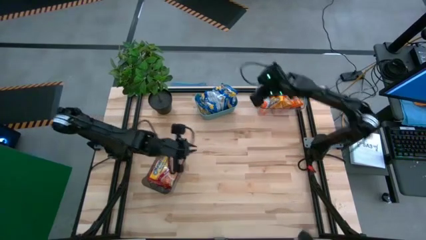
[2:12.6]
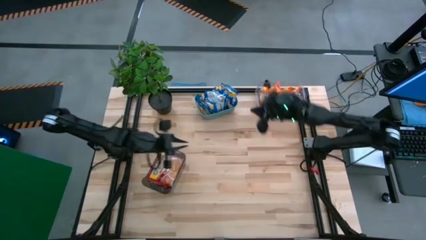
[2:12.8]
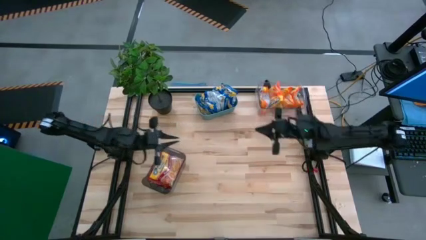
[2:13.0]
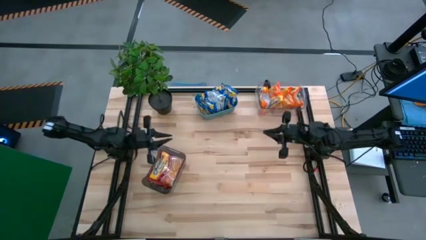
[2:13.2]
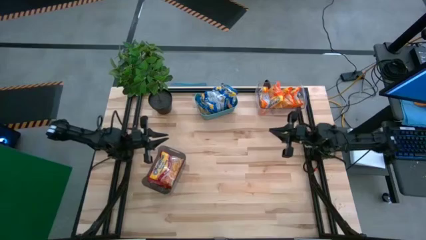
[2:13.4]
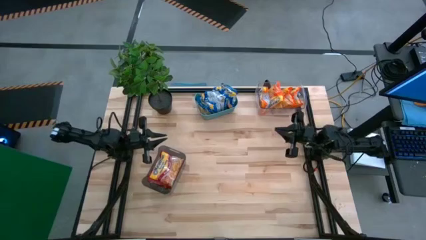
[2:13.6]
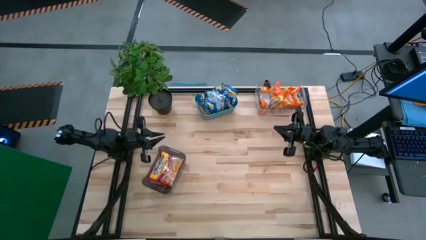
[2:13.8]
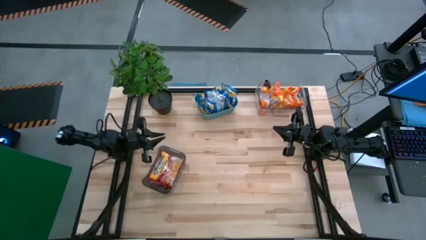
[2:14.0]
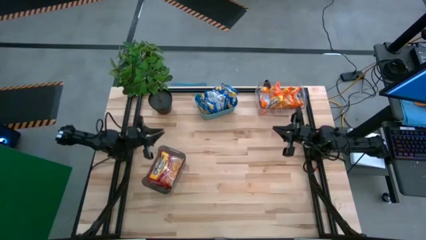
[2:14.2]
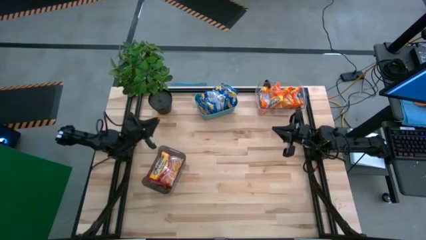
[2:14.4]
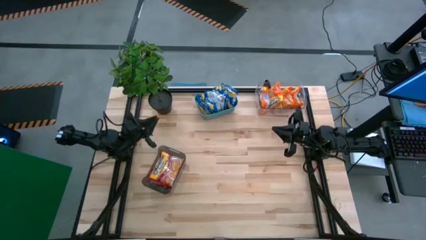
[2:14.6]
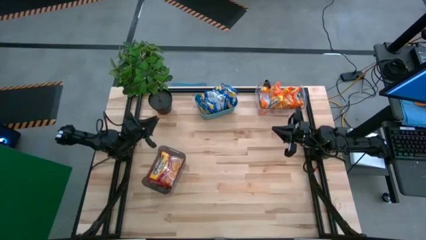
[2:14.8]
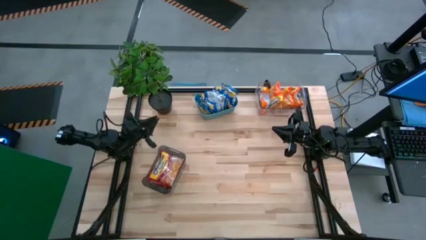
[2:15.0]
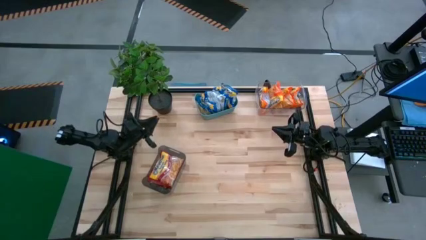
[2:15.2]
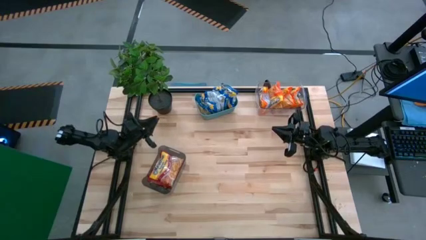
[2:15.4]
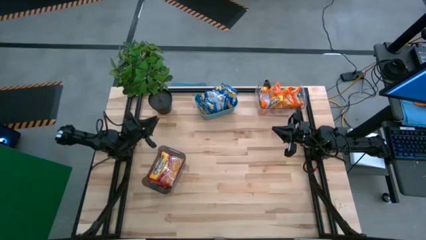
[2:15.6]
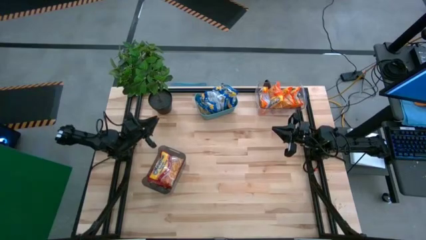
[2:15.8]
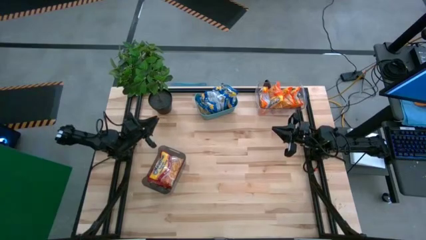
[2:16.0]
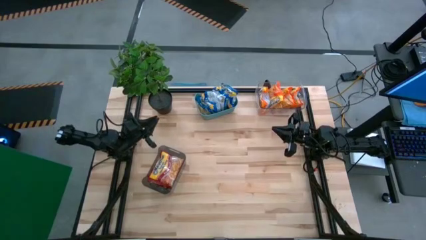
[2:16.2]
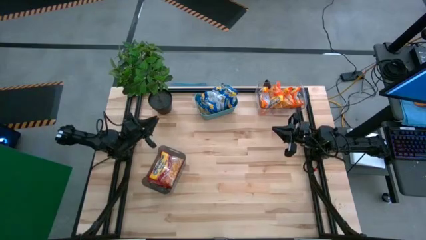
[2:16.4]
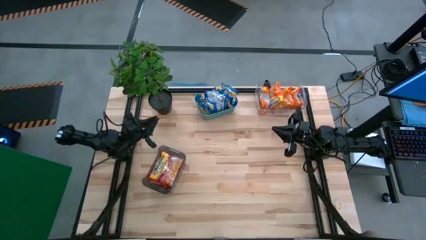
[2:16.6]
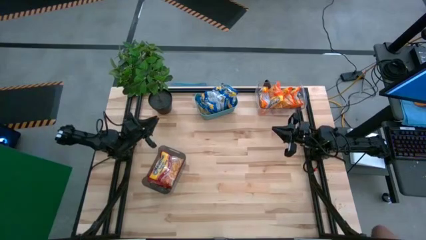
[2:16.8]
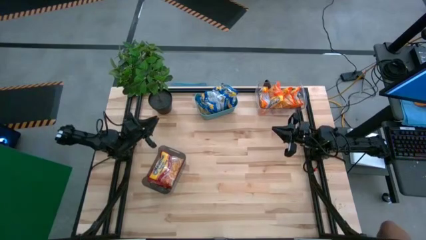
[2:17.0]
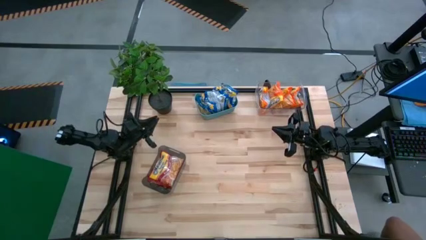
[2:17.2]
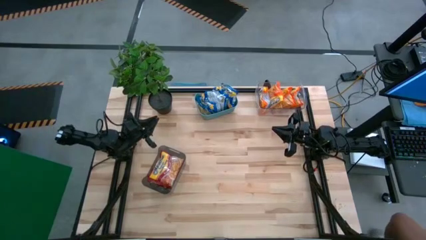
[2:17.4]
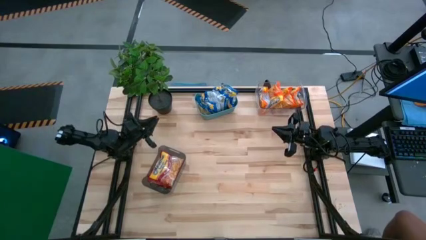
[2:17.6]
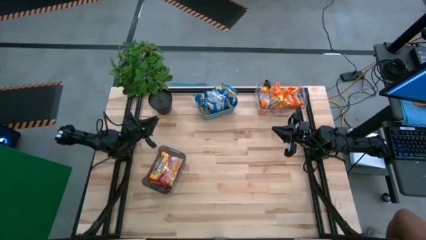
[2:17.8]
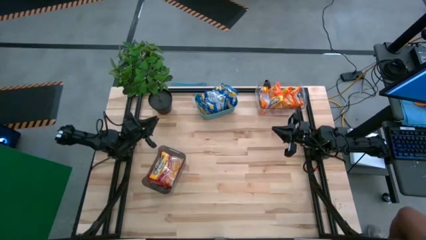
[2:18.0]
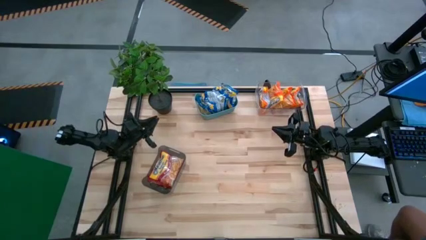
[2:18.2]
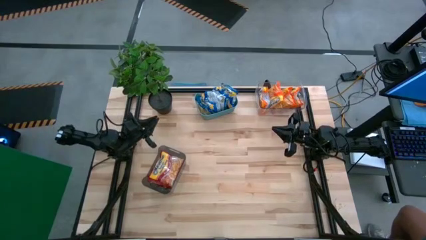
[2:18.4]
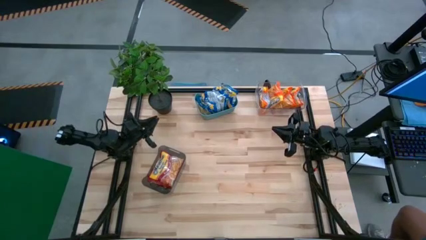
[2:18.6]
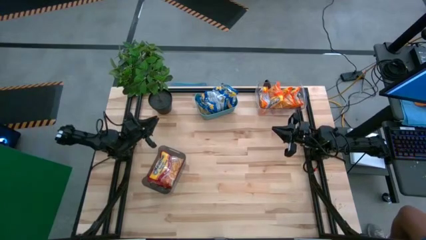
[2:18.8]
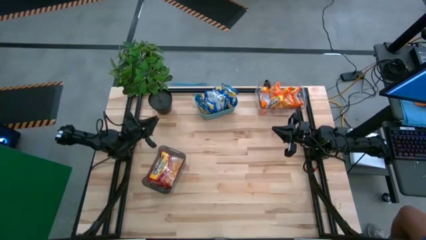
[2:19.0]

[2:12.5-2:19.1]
Task: Sort Maruchan noodles
Return to Home Position

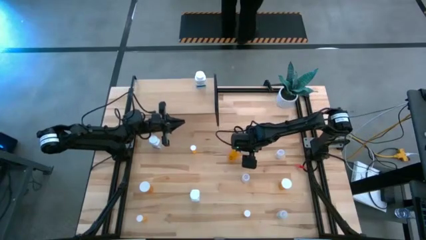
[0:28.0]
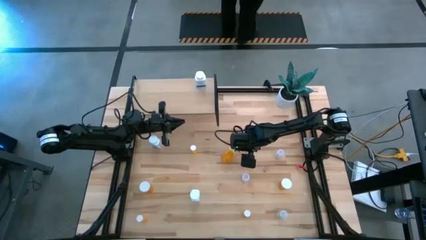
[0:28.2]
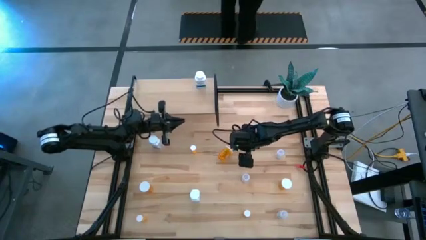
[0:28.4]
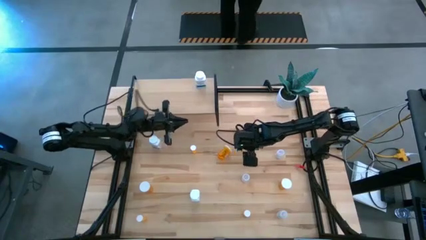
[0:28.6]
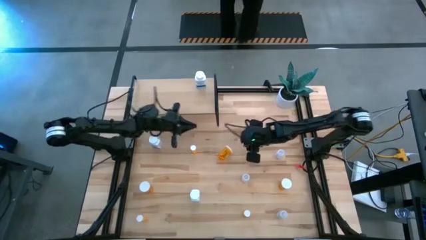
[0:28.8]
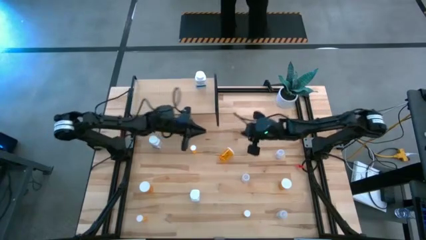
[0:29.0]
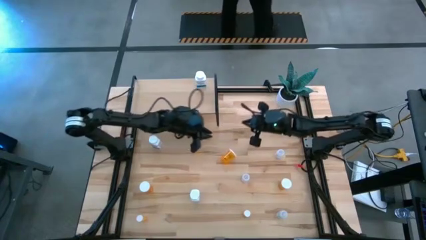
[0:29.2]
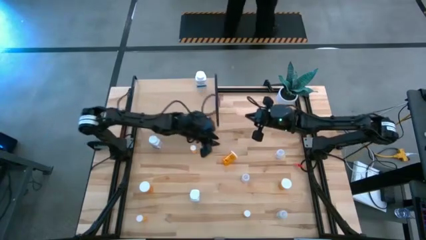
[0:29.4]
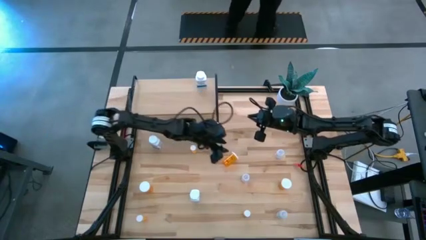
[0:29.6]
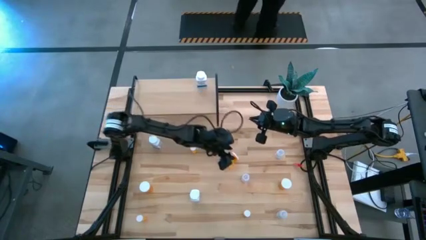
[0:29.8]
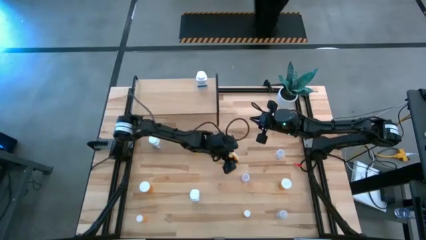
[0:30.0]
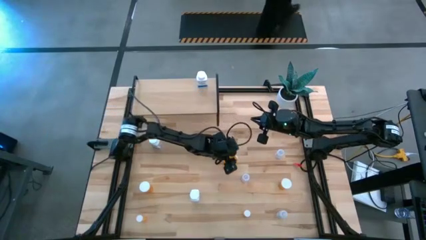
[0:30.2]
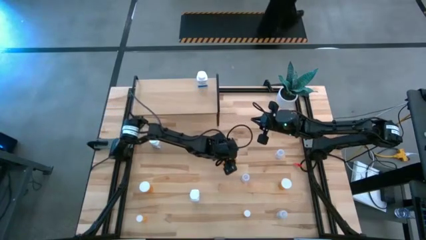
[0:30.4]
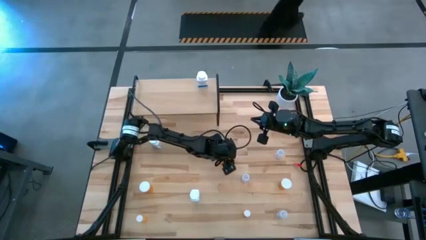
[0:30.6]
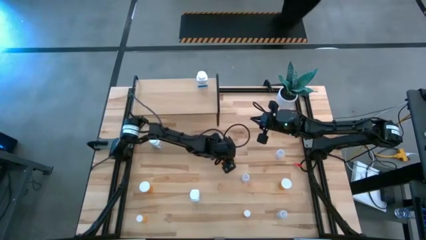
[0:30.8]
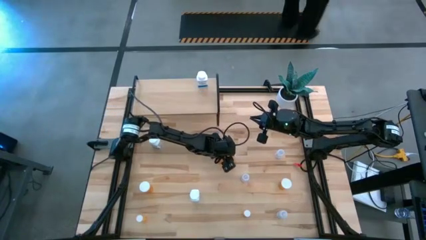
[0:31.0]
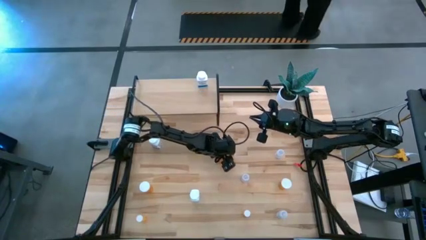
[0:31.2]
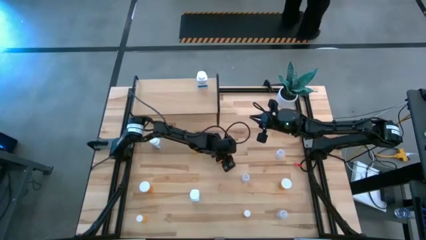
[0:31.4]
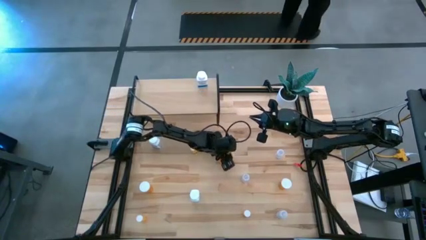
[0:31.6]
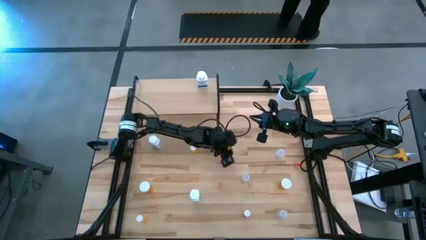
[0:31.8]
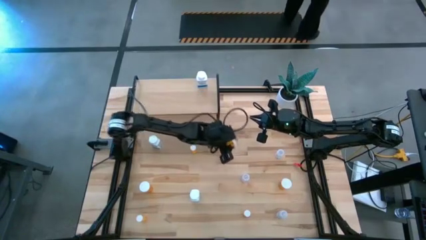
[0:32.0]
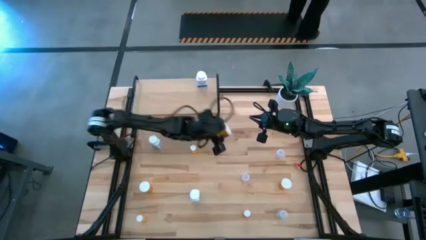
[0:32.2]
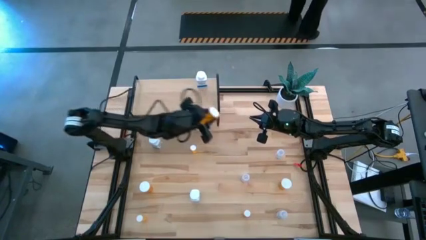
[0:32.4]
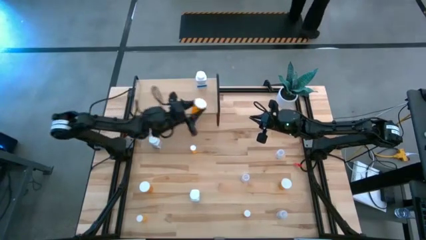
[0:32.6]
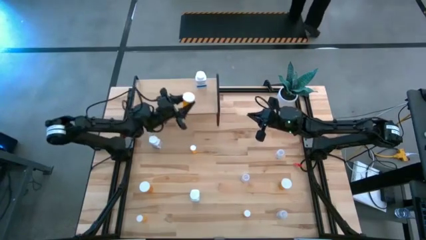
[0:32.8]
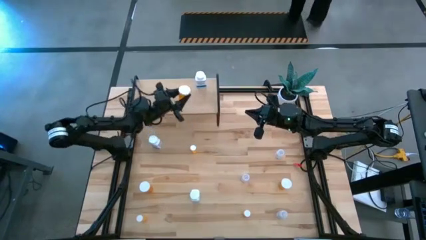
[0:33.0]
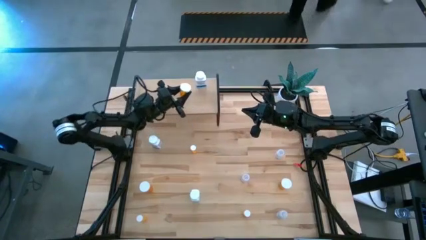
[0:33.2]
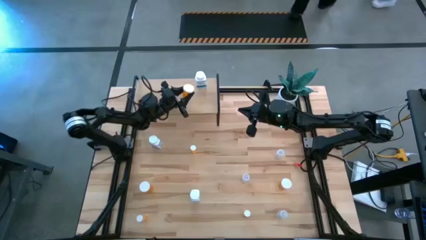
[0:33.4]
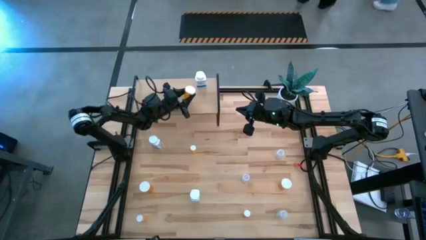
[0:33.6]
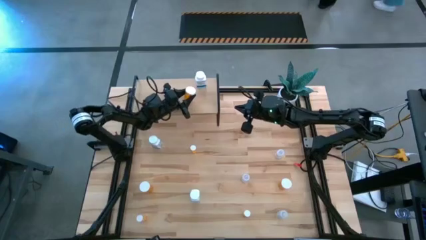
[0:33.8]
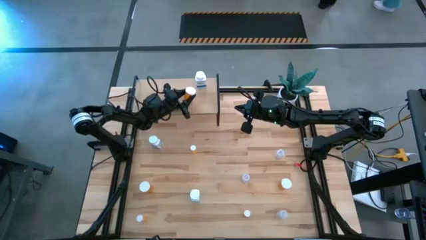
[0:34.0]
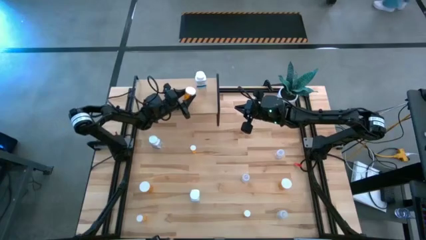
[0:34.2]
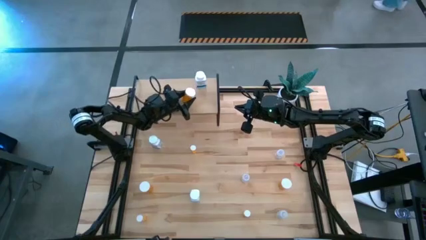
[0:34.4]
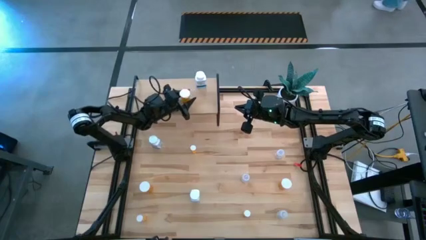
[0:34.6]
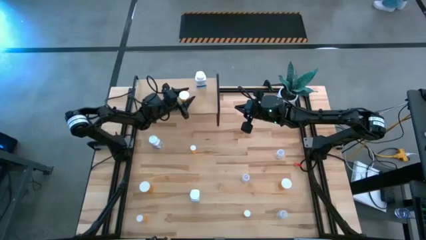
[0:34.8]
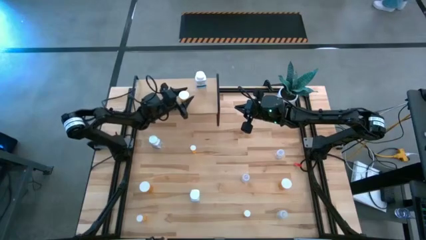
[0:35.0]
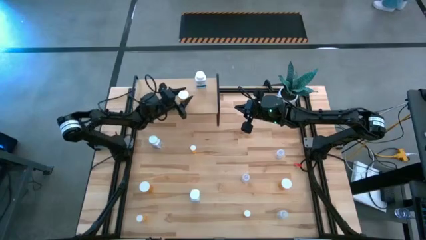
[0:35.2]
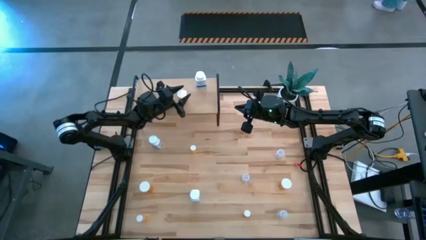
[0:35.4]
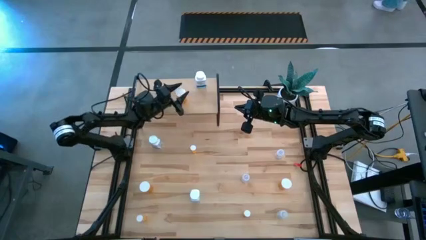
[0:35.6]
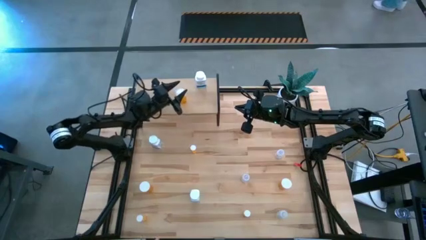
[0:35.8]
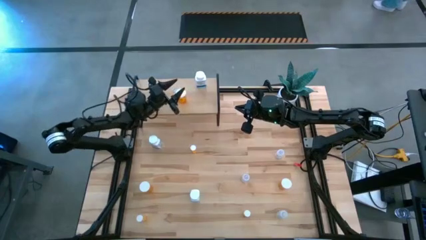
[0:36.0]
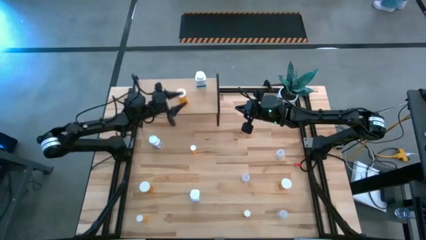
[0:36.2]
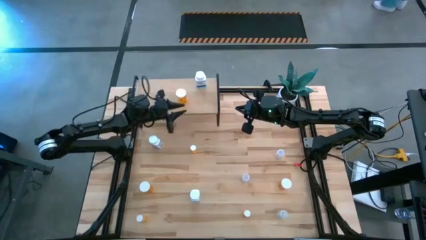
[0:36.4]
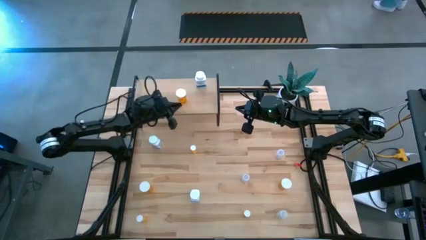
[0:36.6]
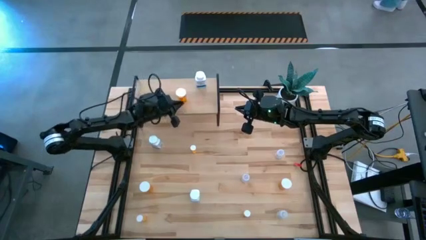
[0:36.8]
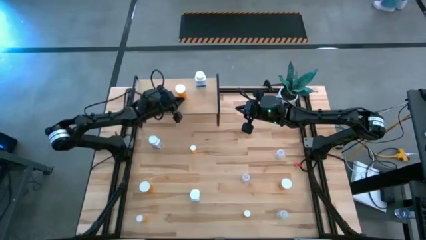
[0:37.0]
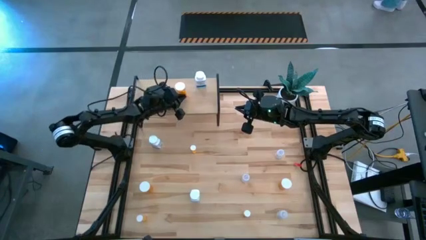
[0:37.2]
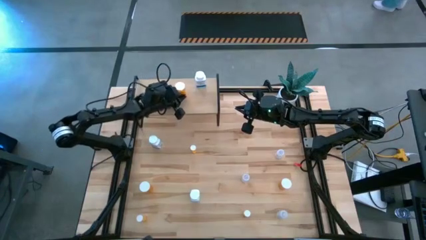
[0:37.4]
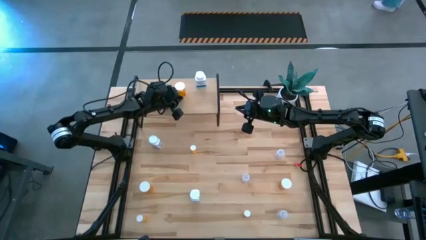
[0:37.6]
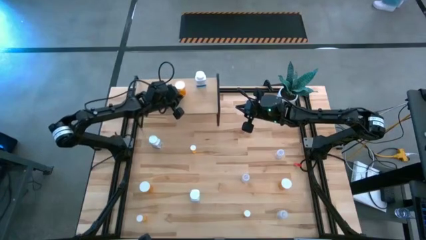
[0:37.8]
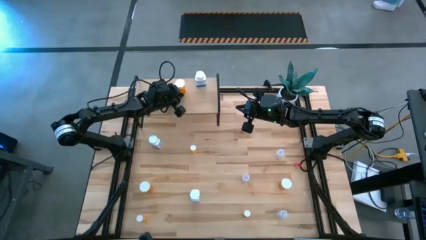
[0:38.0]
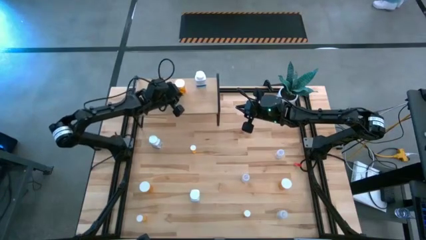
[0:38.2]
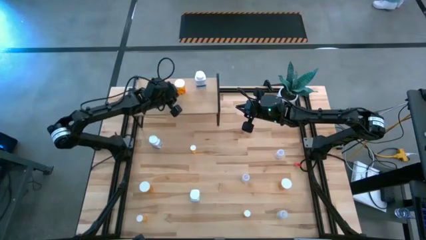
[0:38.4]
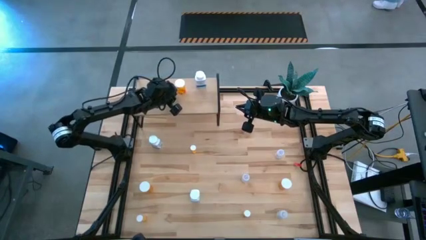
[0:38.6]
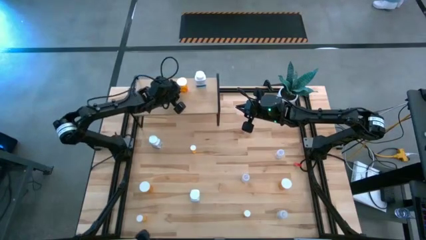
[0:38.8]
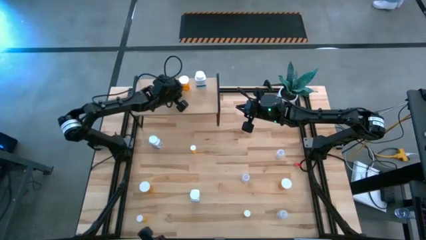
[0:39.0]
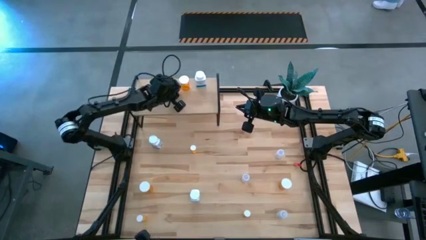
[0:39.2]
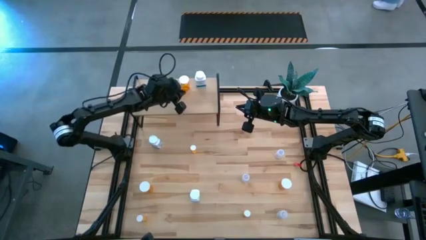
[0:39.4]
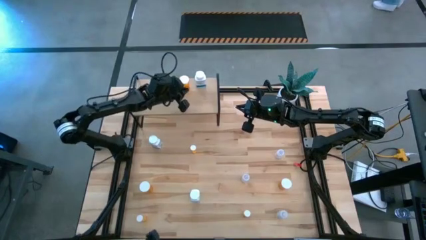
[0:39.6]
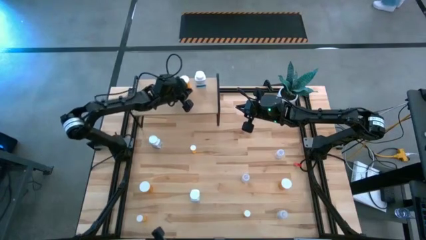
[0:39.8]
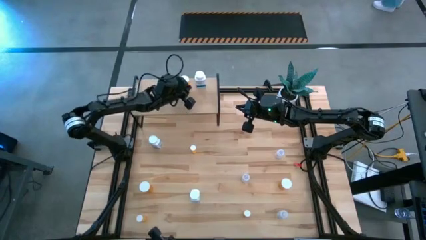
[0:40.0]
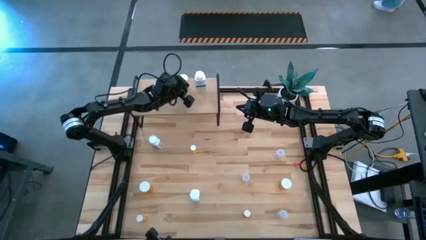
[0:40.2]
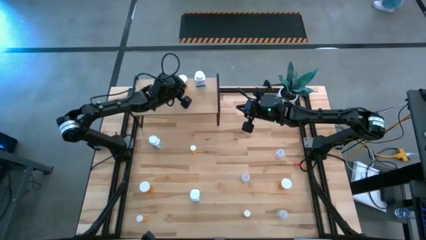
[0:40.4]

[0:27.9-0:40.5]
Task: Pick and place medicine bottles onto shelf by color
Put the top large orange pill bottle on the shelf
